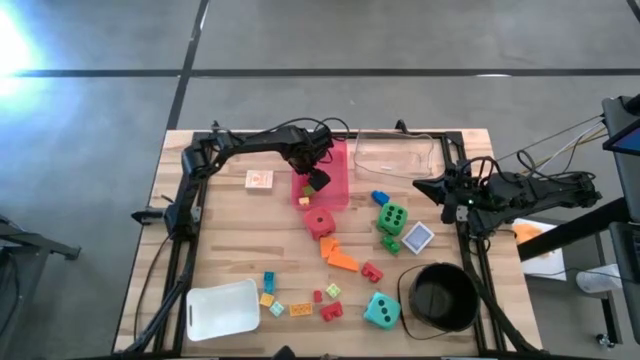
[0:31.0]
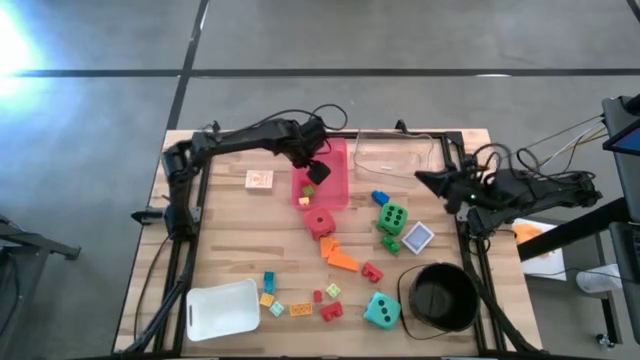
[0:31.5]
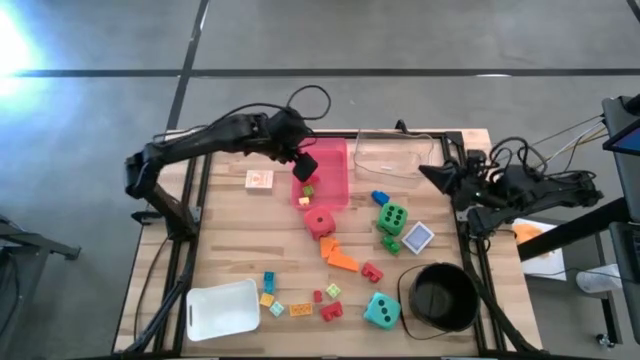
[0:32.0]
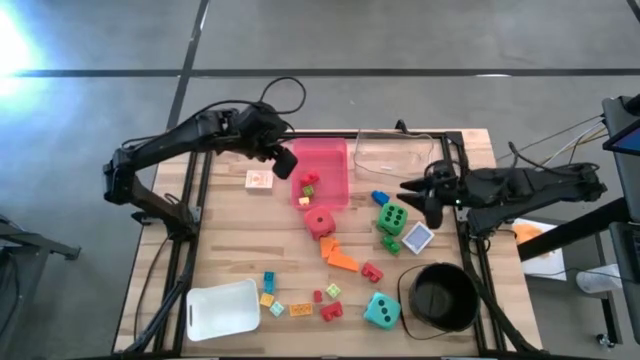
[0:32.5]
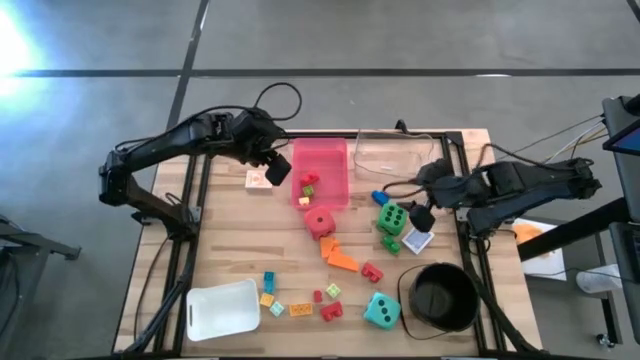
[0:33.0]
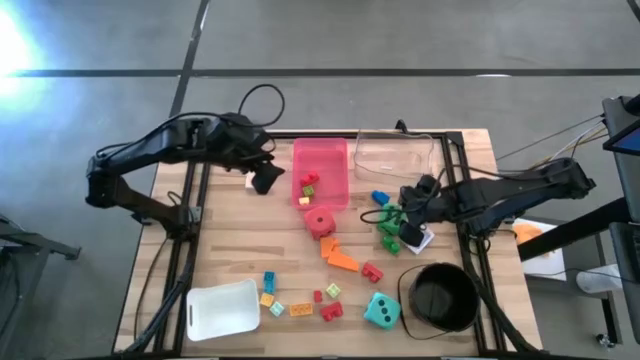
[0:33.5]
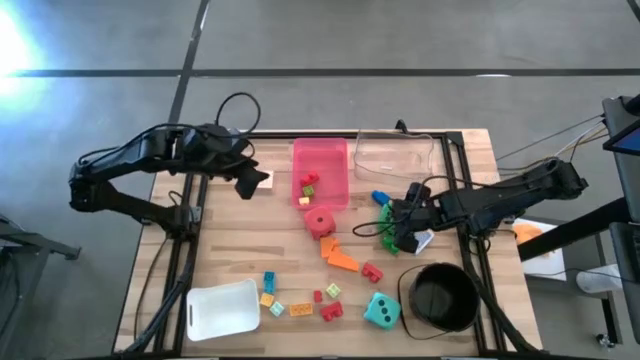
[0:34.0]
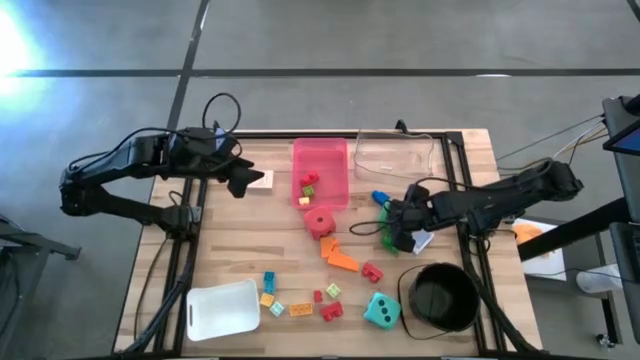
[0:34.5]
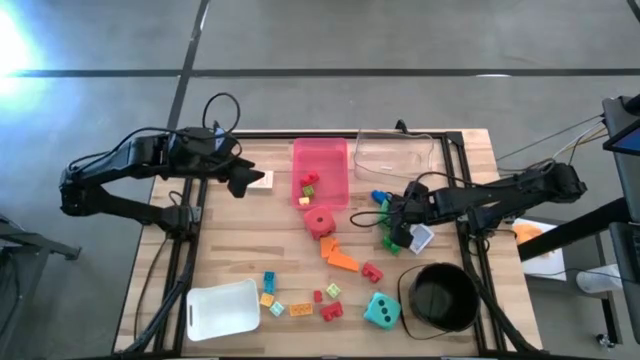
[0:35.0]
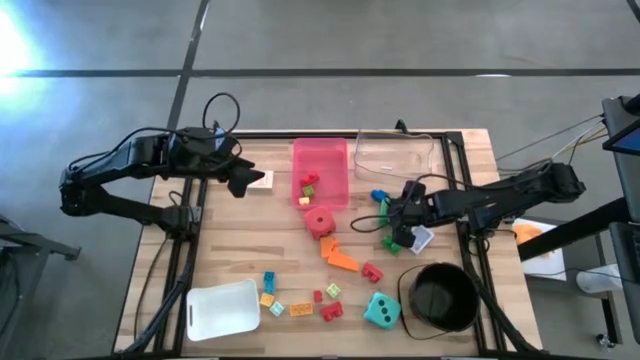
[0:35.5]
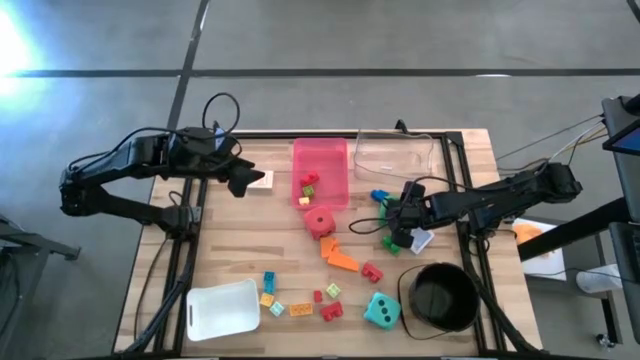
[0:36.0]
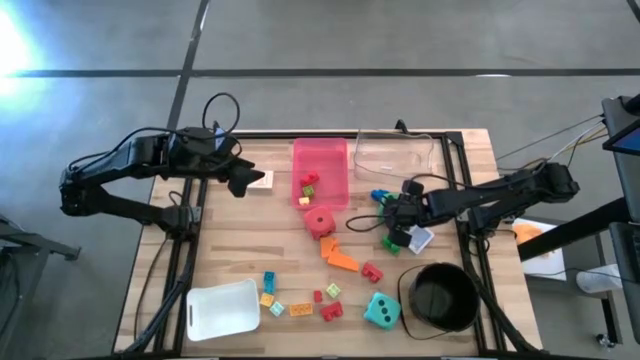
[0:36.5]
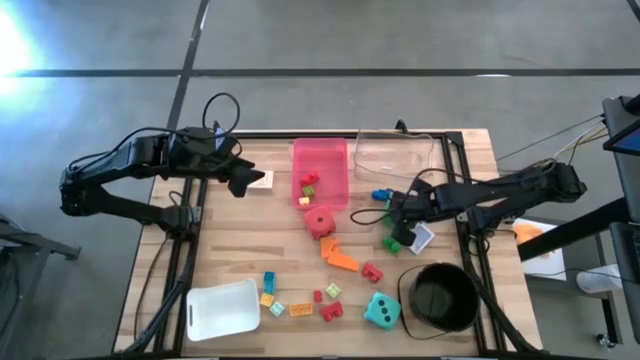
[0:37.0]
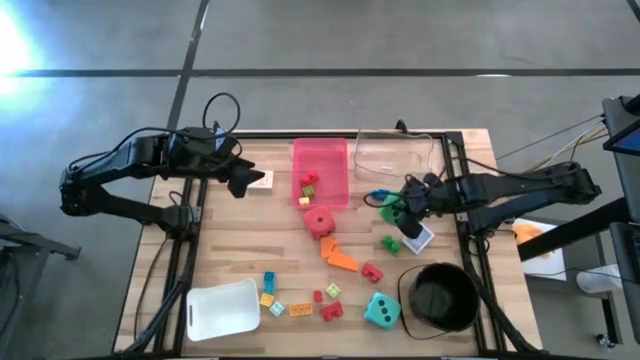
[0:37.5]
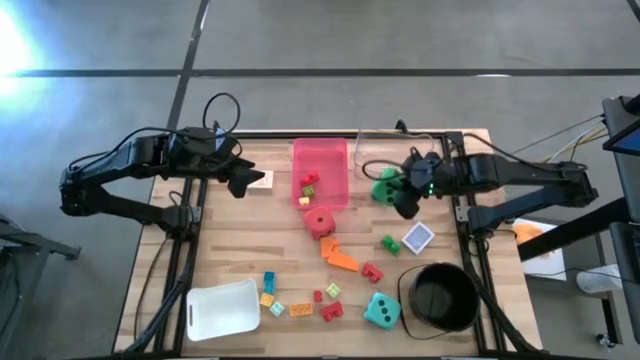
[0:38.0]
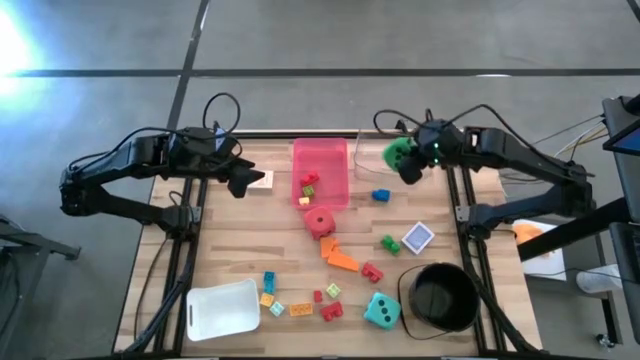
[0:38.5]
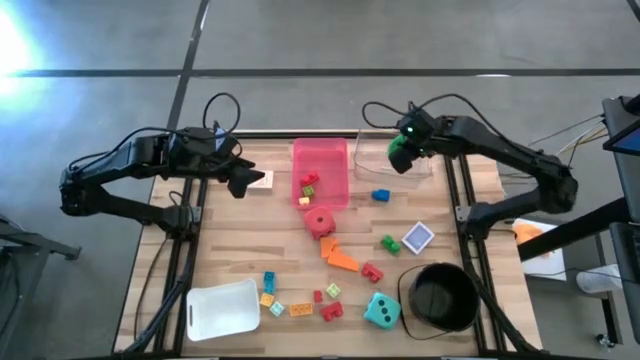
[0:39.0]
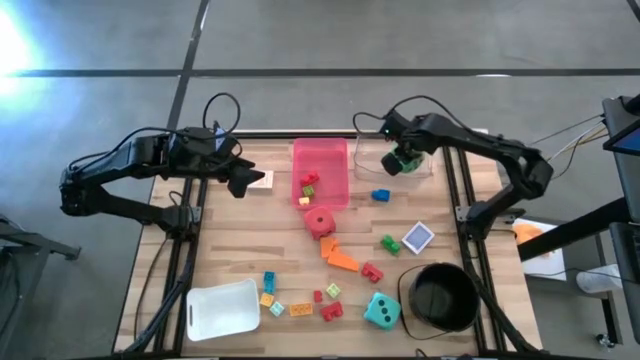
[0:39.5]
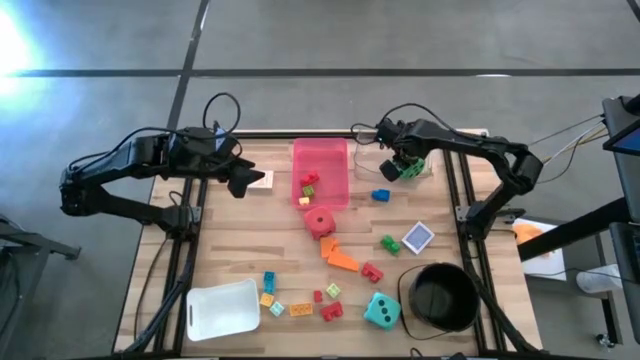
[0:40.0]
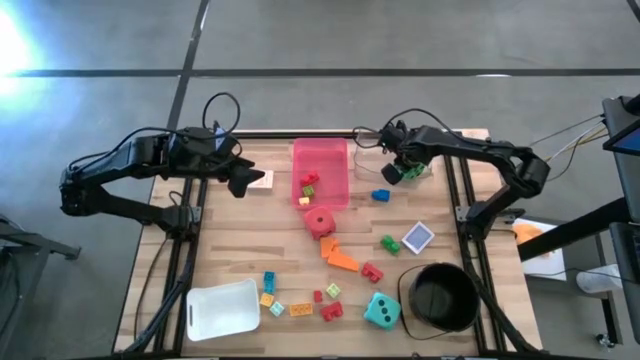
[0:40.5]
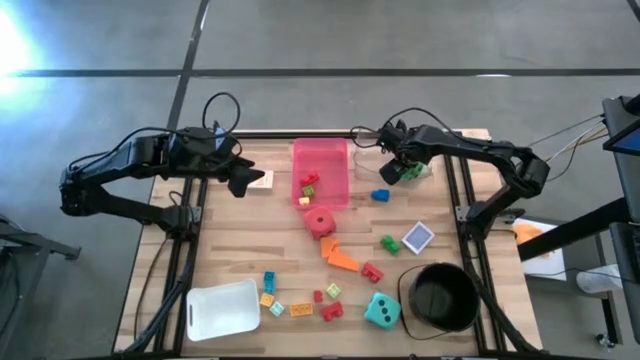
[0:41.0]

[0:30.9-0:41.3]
Task: Pick & Place Toys
Put the green dice into the transparent bin

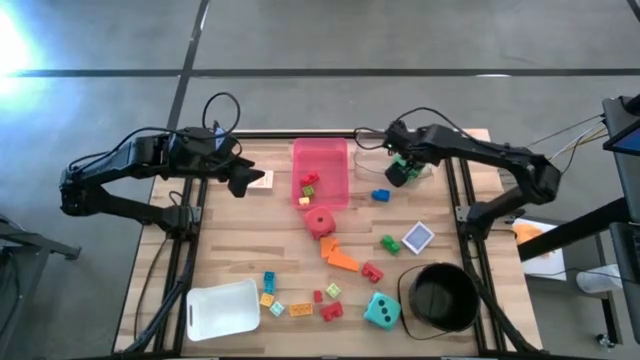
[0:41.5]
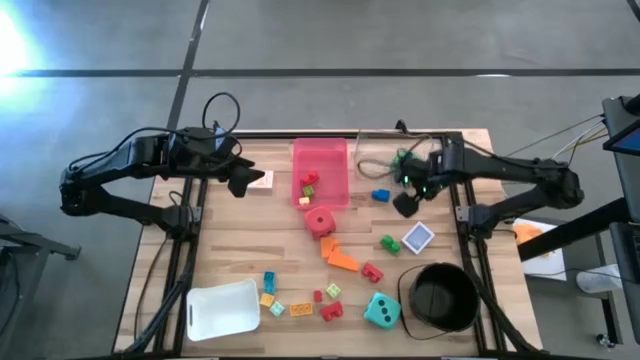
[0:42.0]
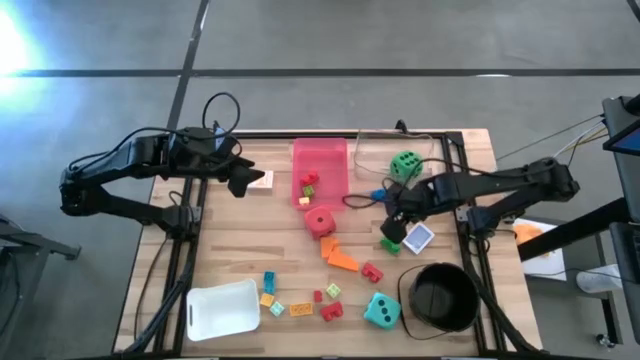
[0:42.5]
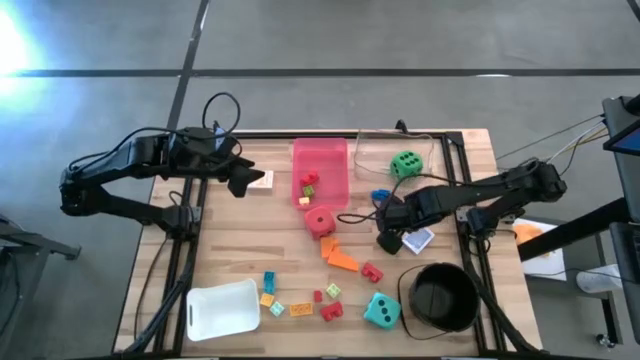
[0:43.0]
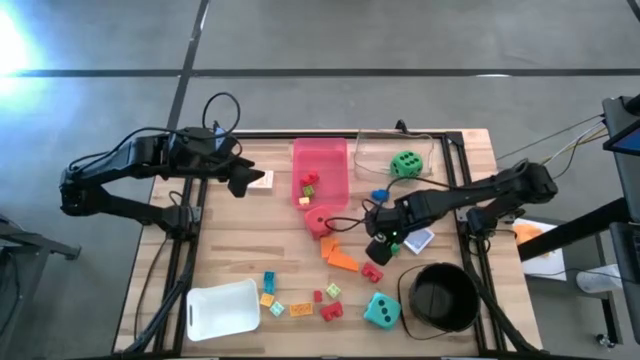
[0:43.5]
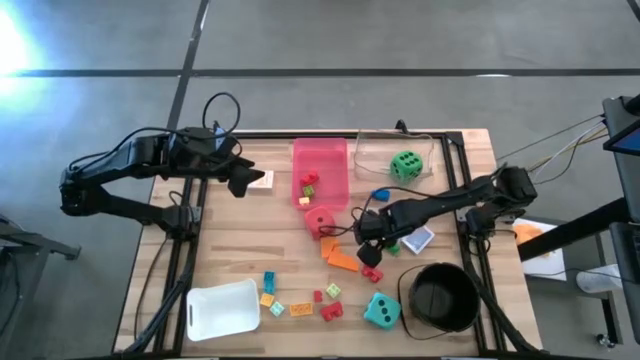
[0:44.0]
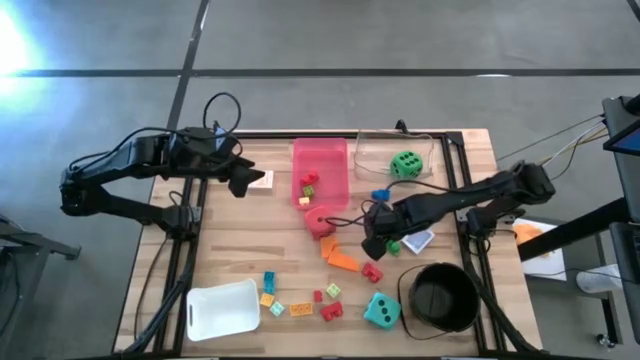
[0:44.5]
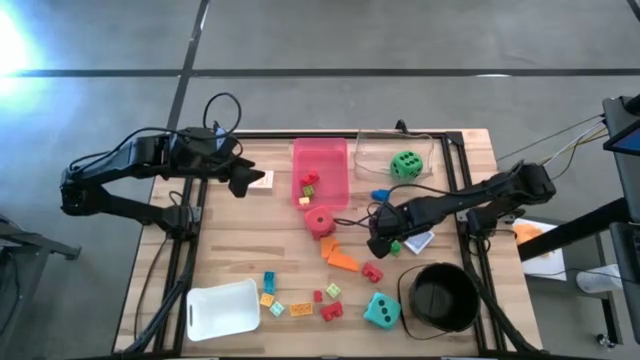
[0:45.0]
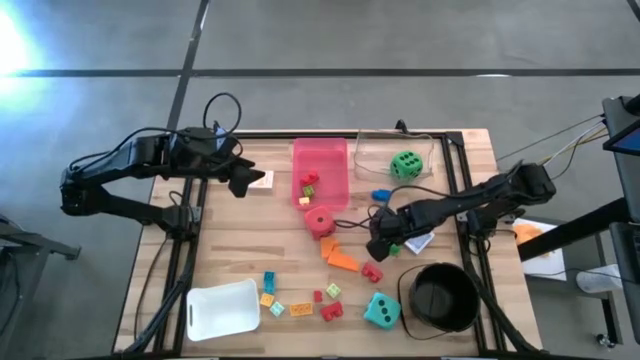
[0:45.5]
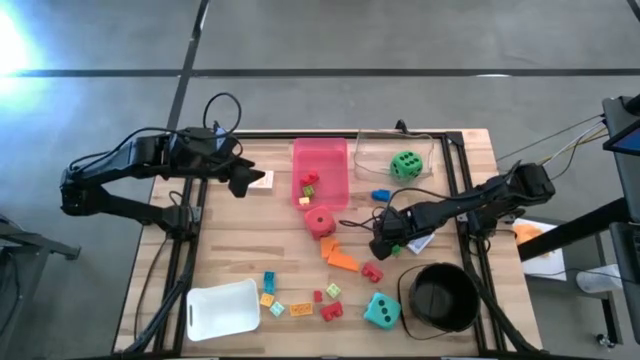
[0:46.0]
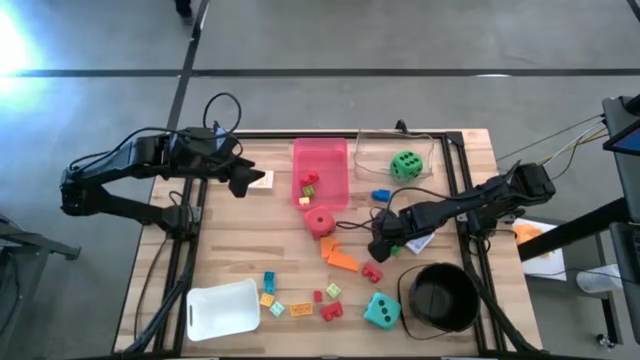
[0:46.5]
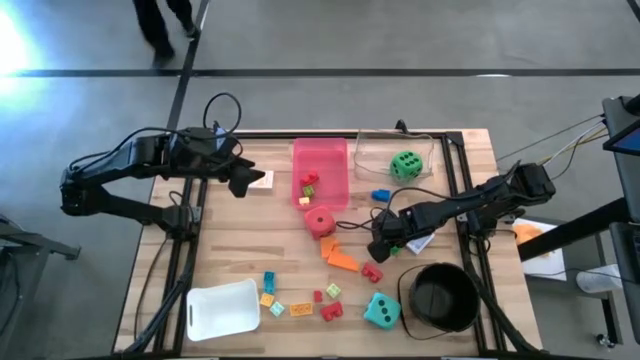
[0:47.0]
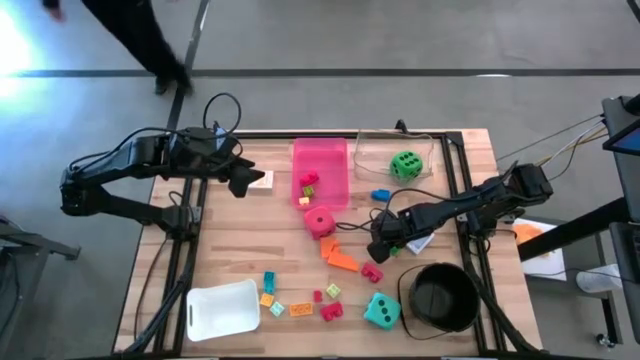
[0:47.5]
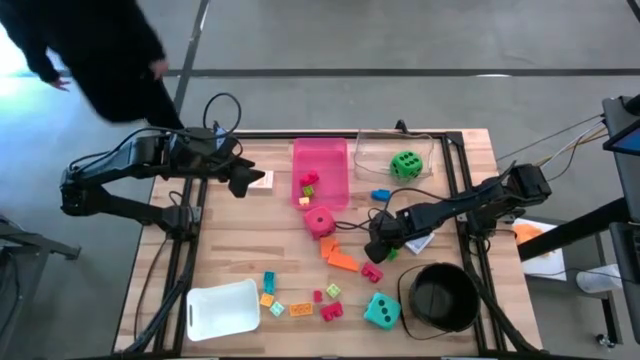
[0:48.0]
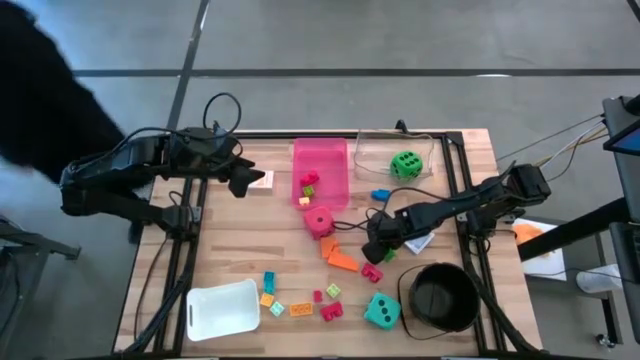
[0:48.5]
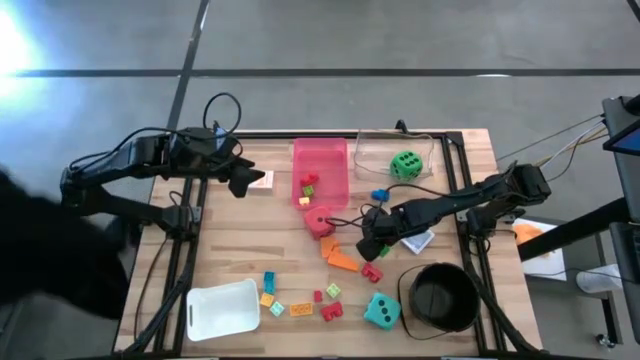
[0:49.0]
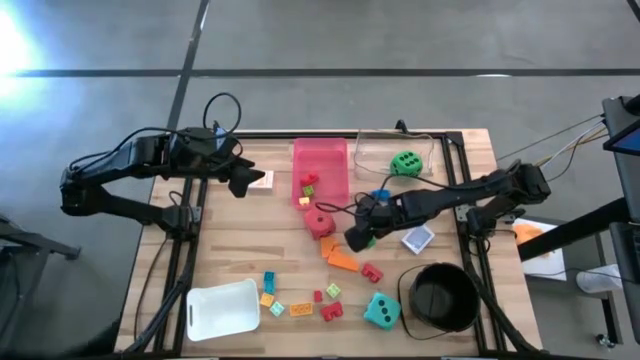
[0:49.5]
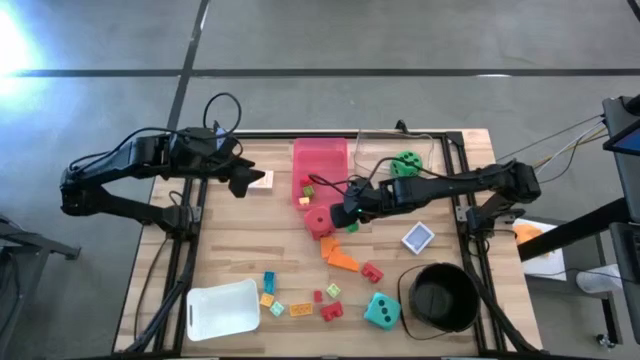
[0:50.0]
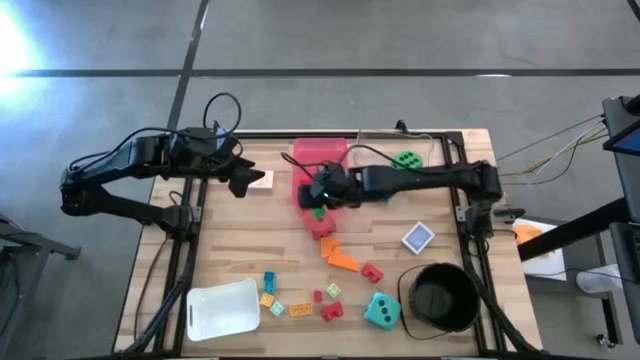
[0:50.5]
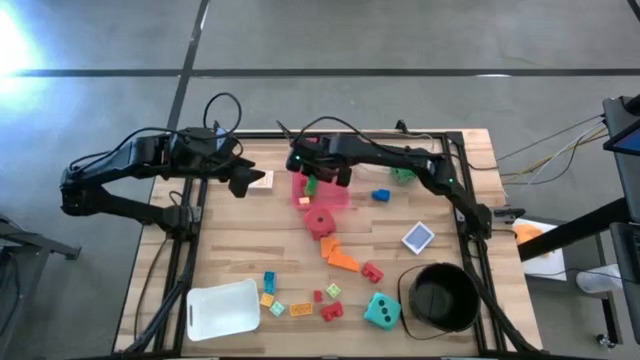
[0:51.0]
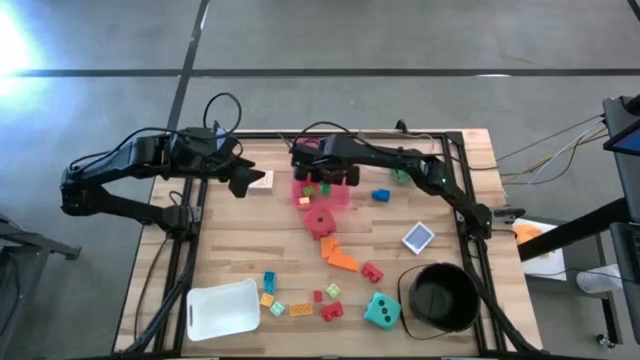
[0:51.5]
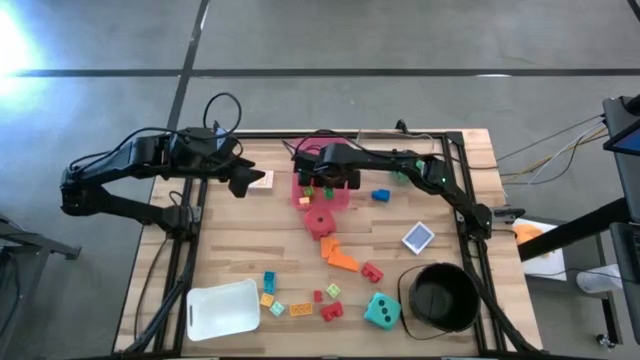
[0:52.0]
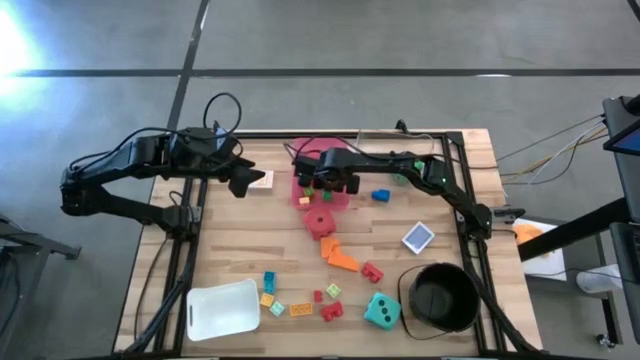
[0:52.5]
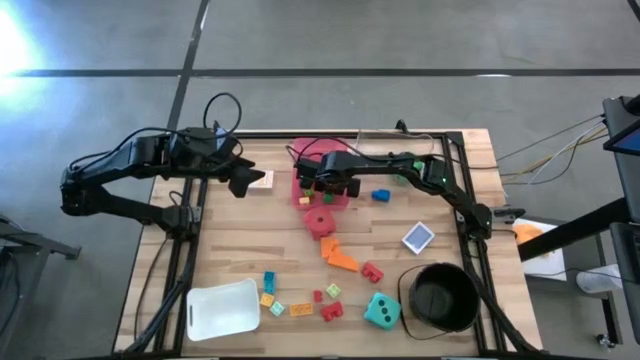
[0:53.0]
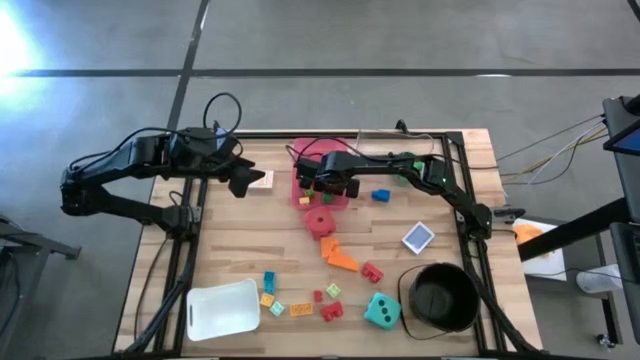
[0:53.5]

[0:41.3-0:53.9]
Put the green game piece into the red bin
